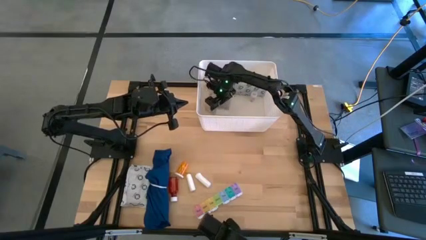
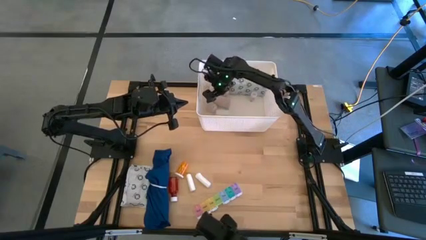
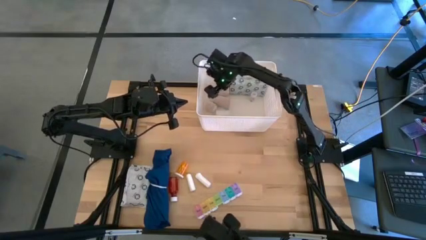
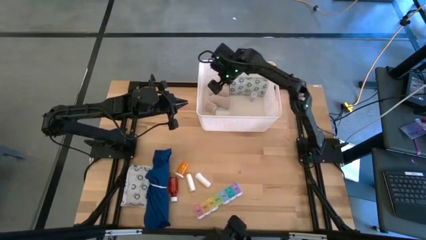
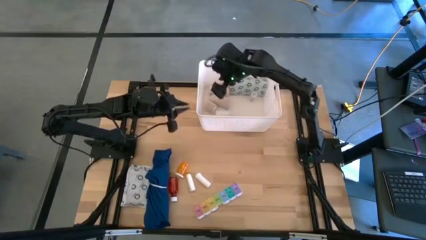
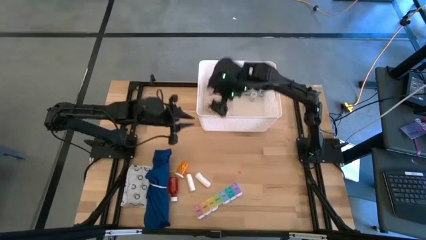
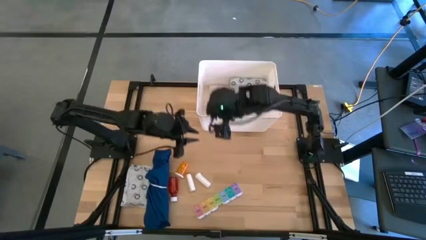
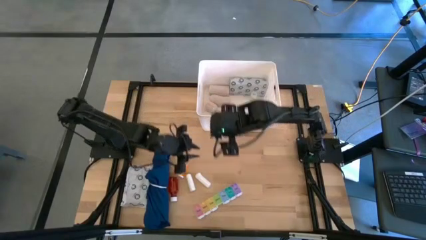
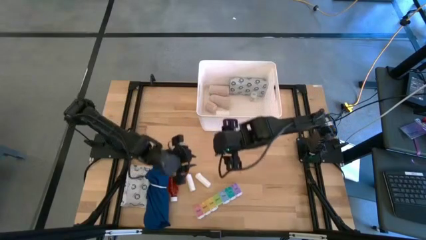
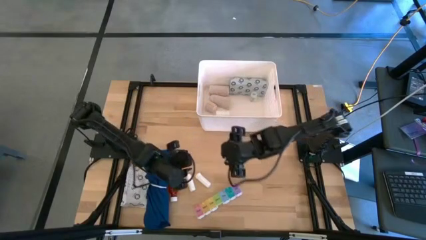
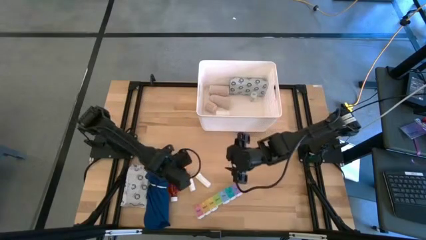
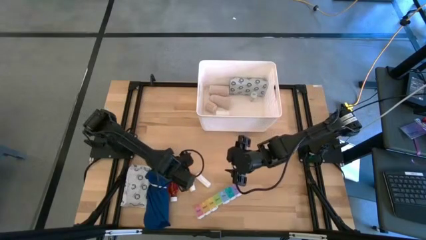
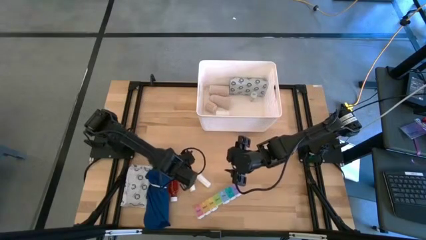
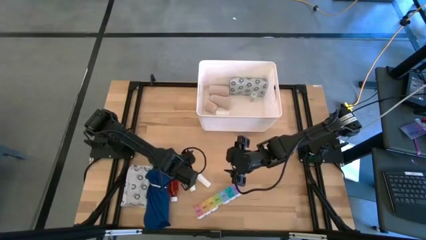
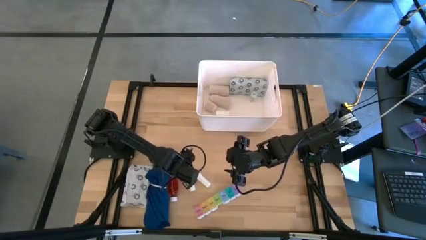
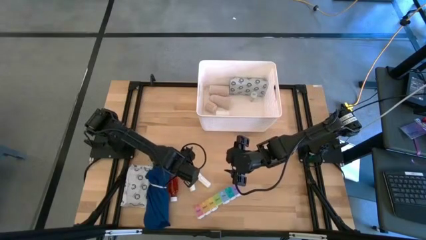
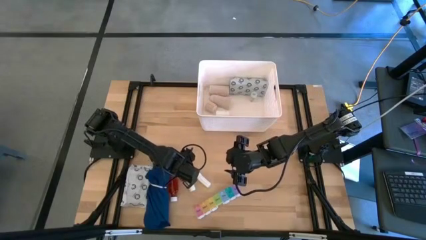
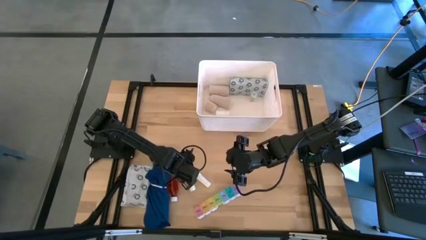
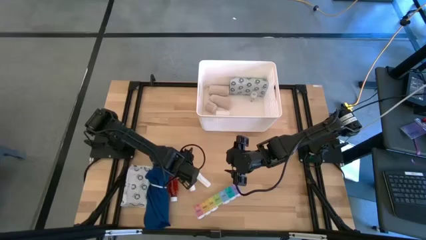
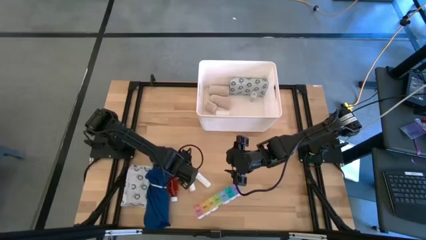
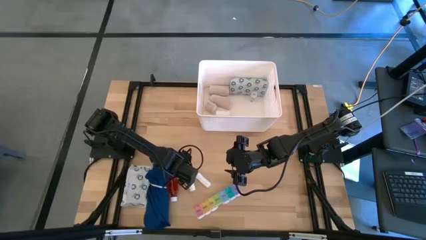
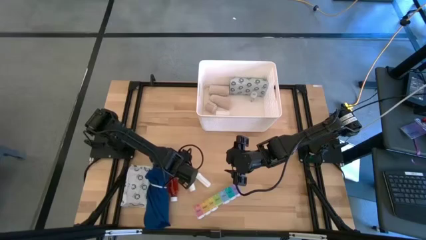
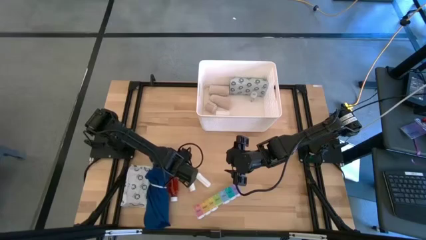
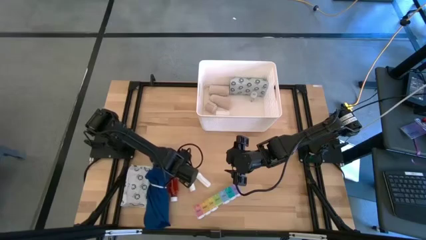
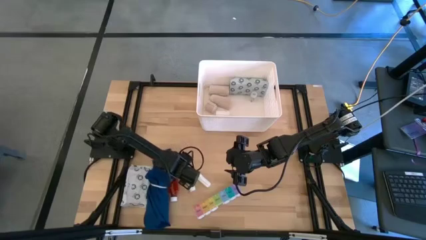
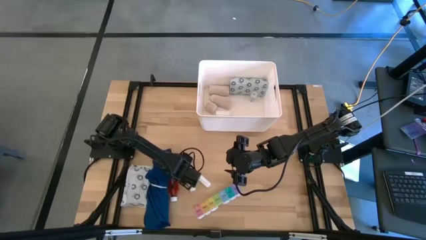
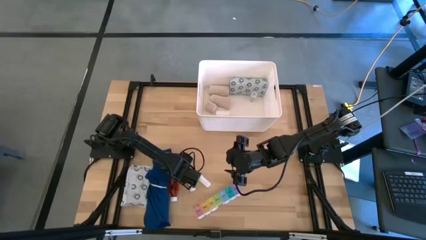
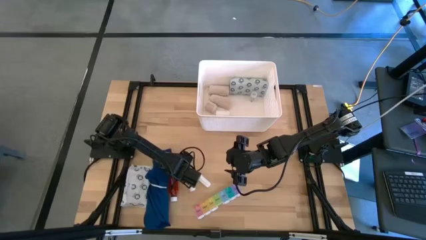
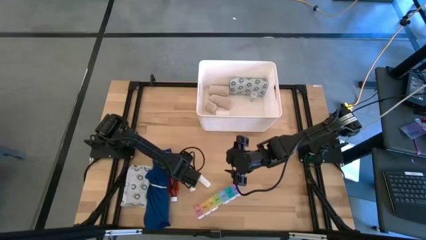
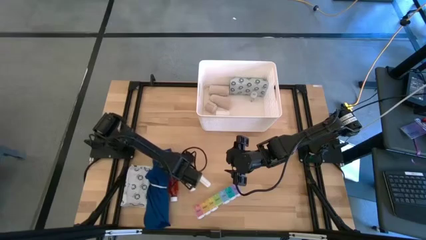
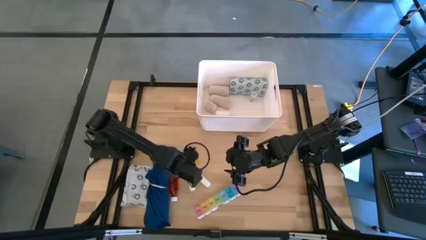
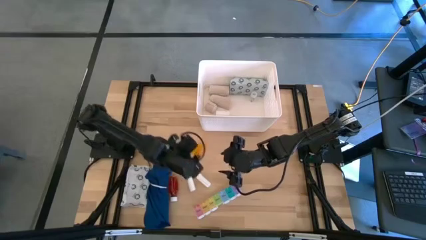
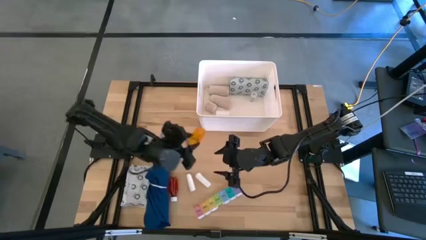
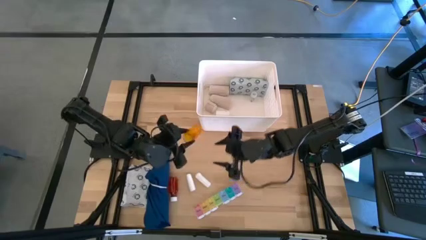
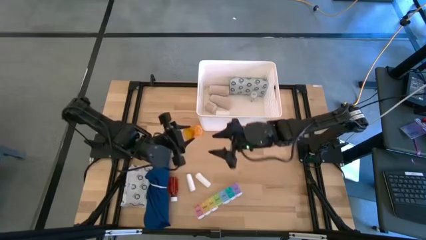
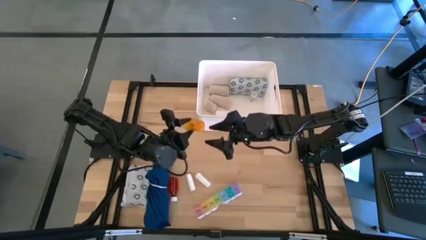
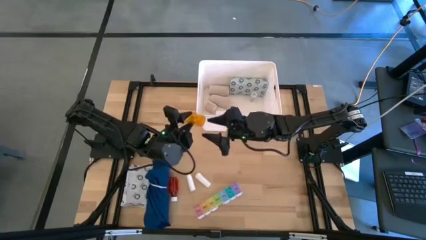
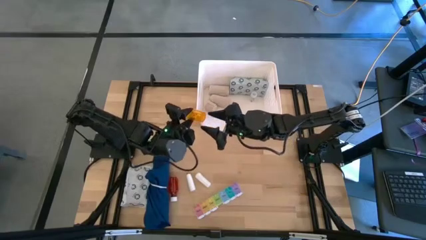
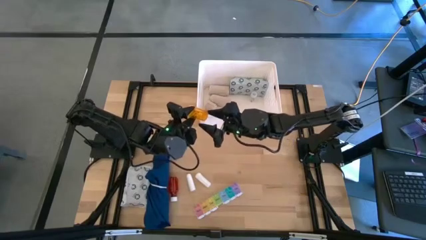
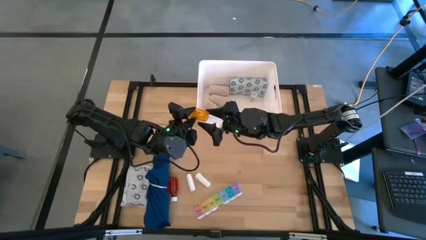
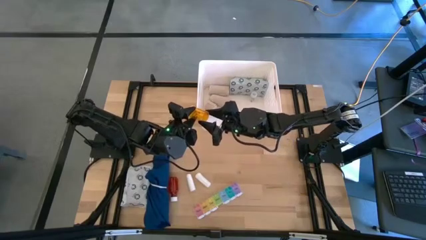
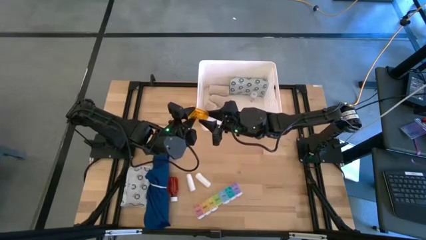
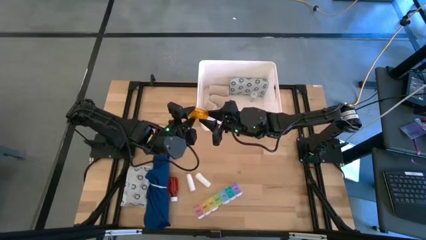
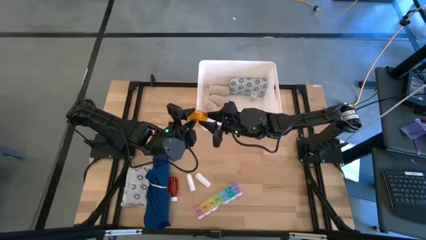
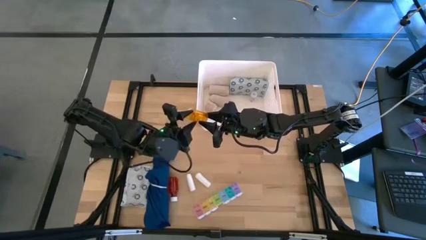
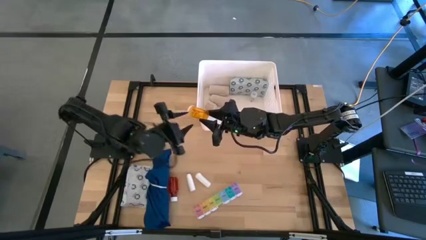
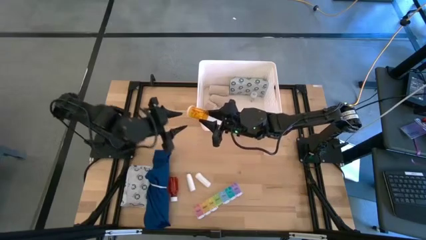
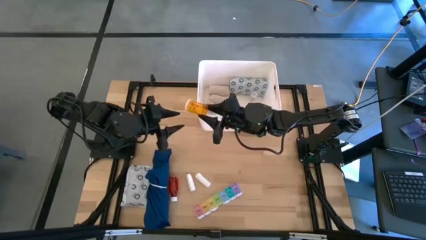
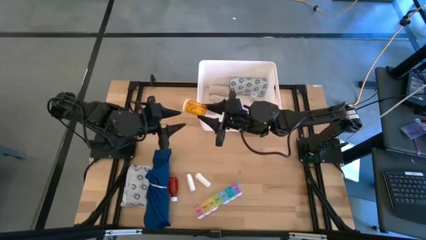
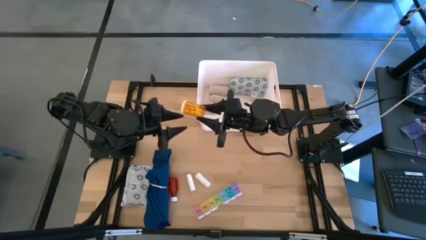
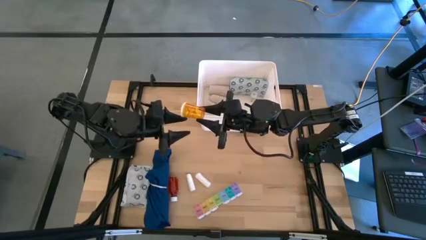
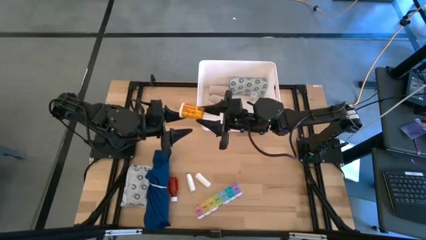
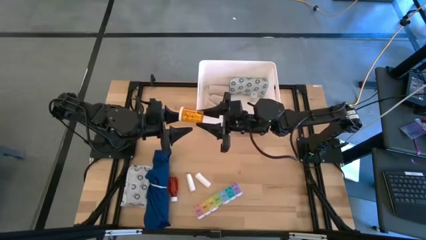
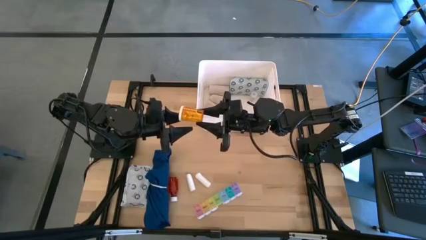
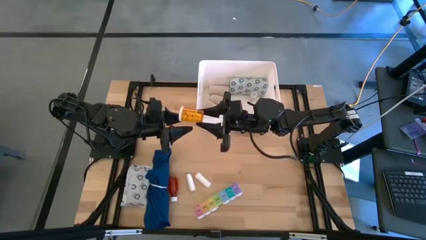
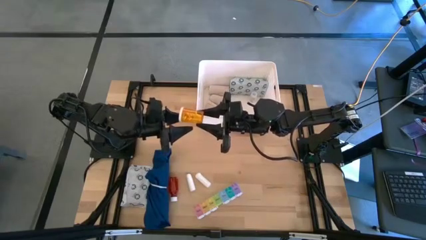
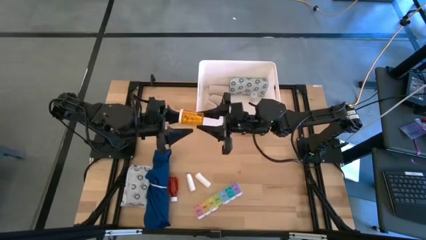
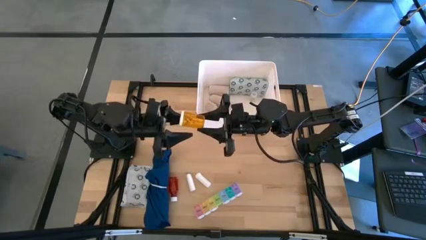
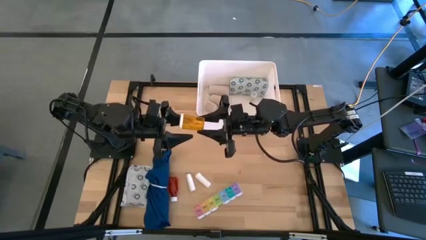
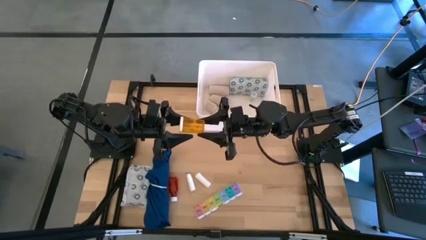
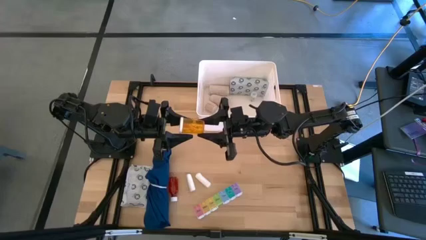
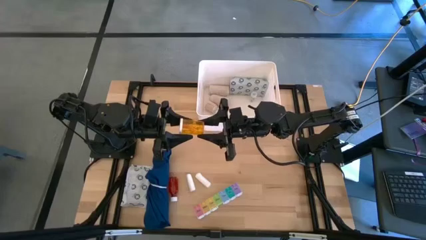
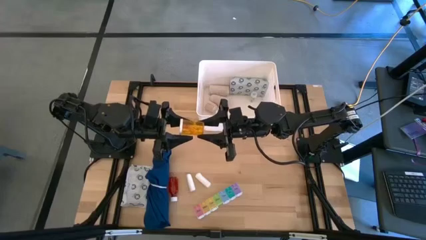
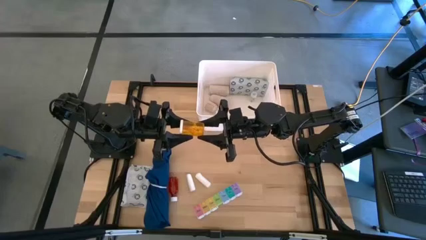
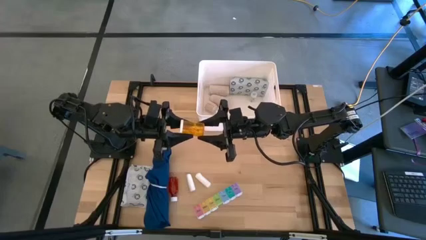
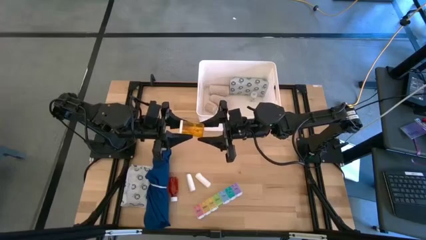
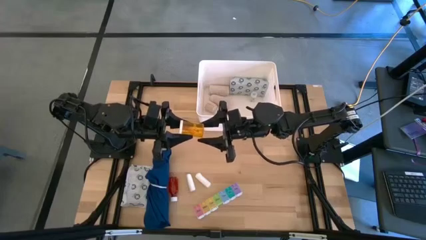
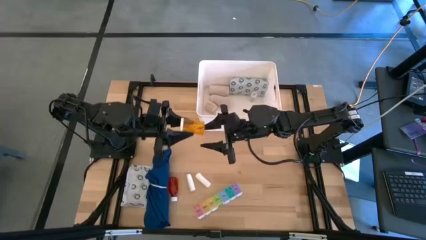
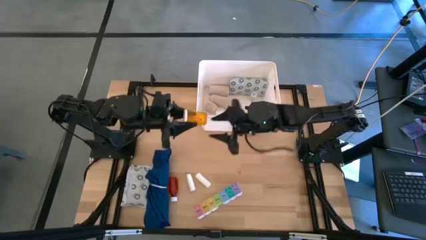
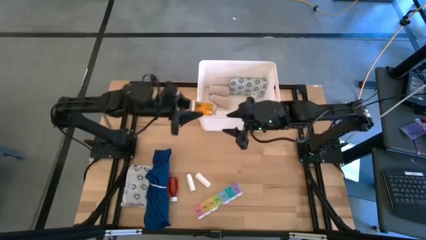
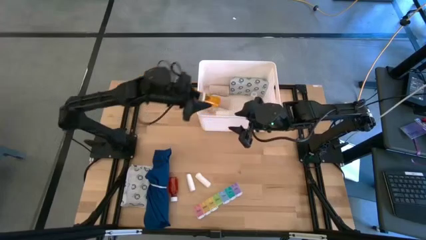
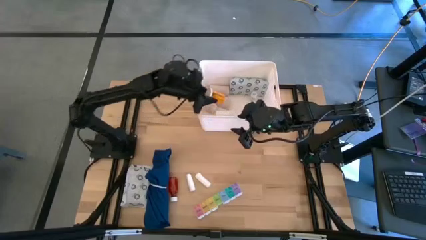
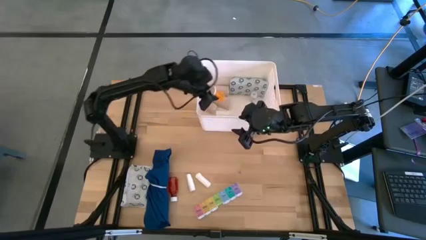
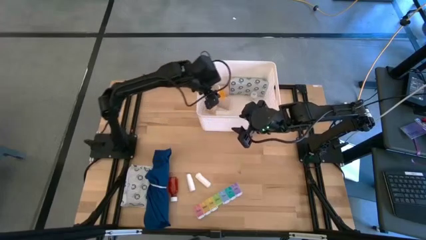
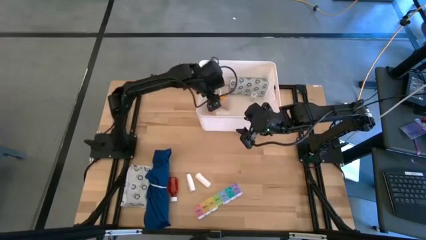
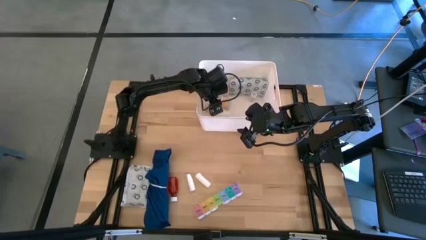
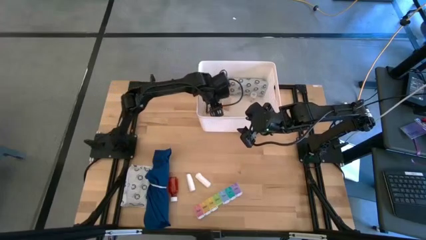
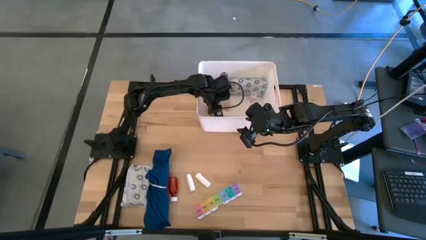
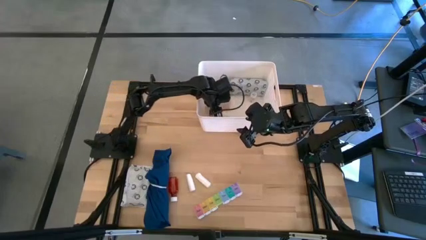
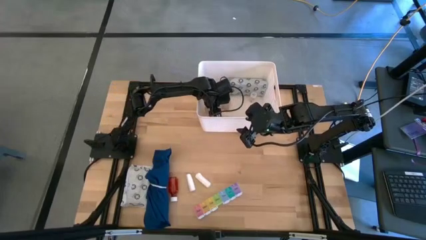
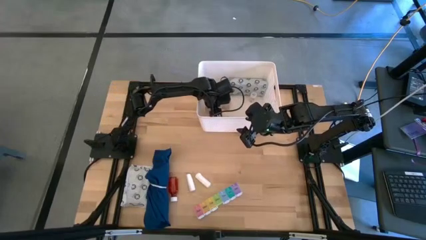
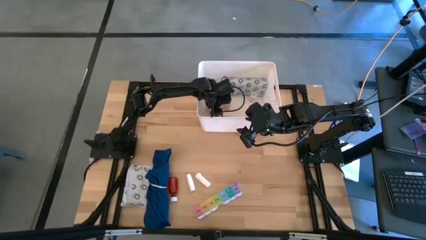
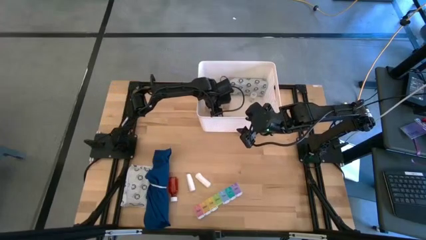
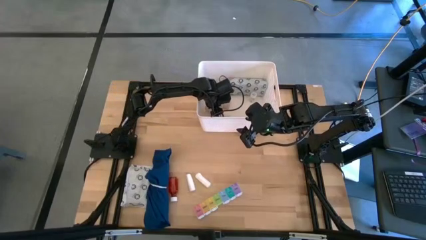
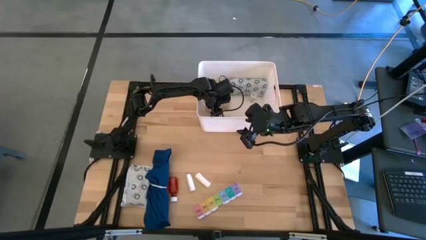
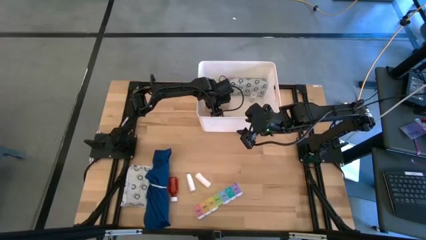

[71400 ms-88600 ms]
Task: Pick & place medical supplies in basket/bin
Put the orange pill bottle into the white container
